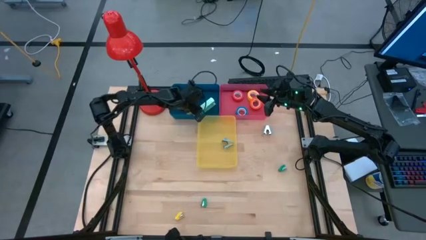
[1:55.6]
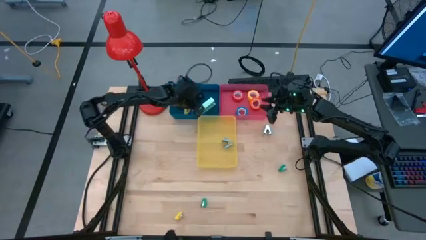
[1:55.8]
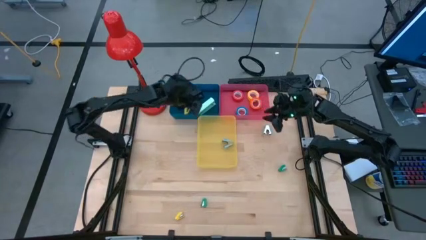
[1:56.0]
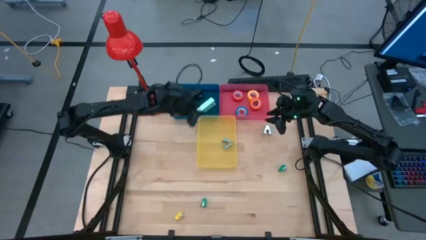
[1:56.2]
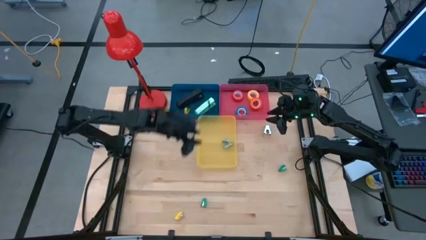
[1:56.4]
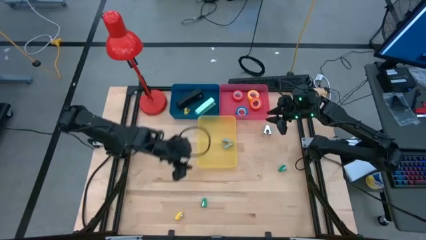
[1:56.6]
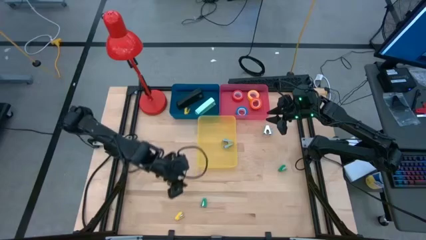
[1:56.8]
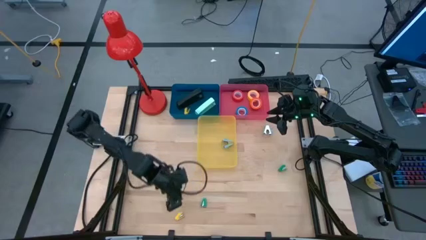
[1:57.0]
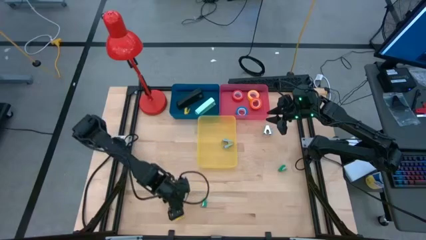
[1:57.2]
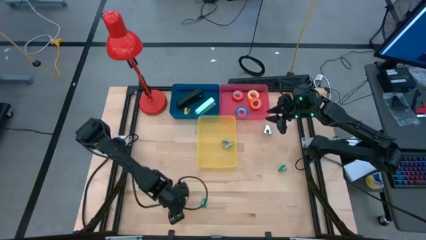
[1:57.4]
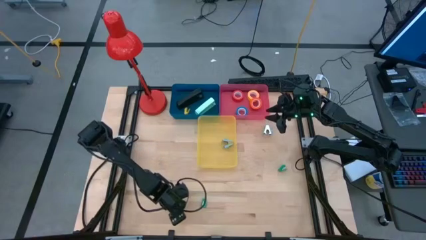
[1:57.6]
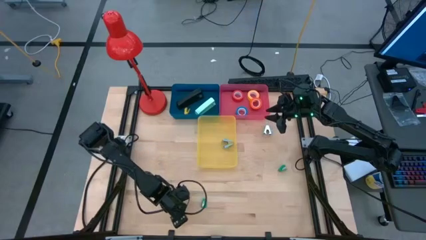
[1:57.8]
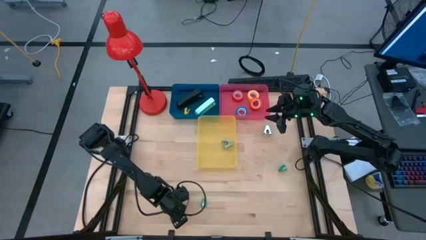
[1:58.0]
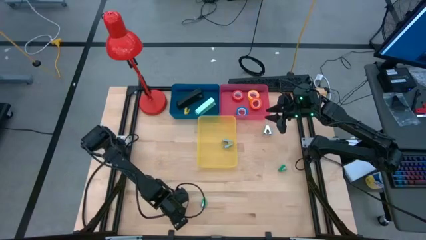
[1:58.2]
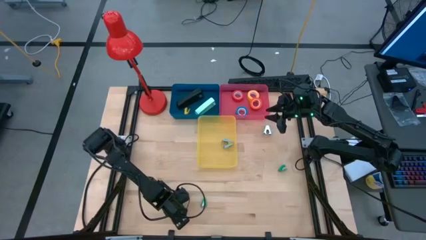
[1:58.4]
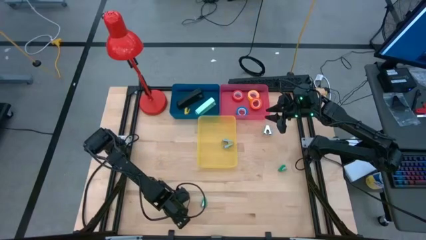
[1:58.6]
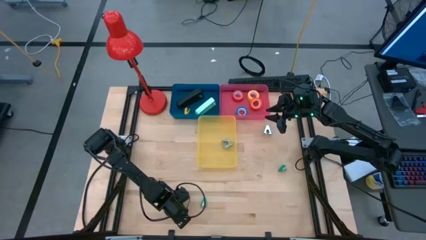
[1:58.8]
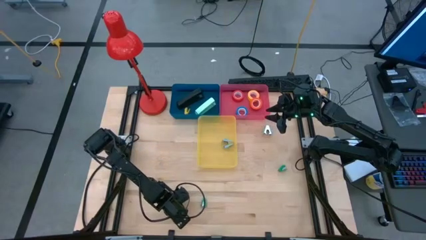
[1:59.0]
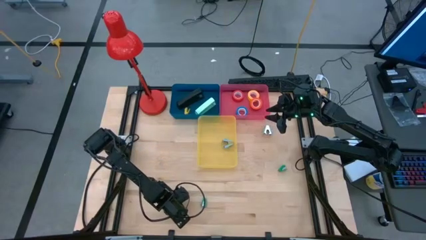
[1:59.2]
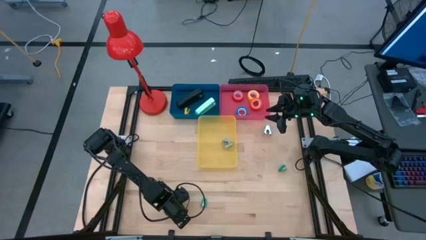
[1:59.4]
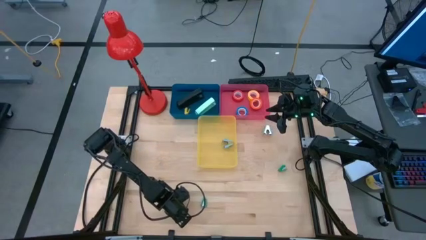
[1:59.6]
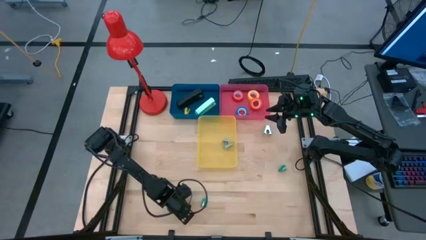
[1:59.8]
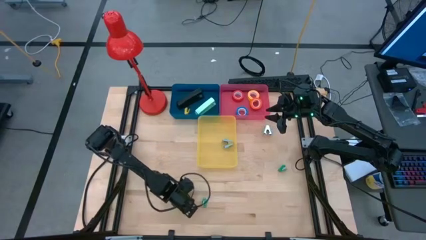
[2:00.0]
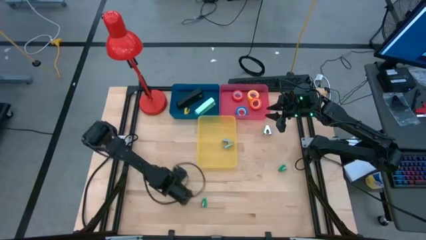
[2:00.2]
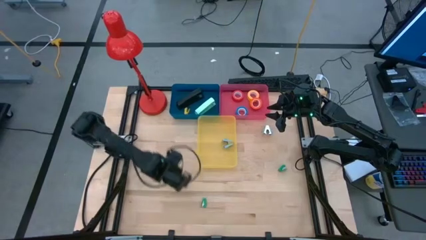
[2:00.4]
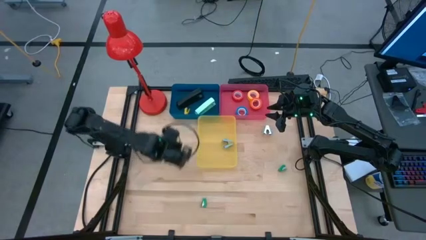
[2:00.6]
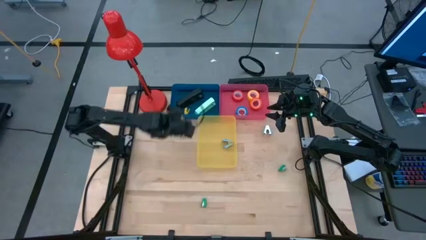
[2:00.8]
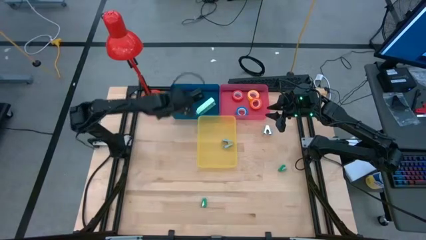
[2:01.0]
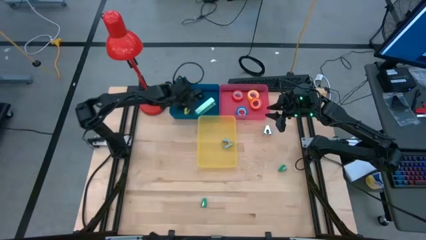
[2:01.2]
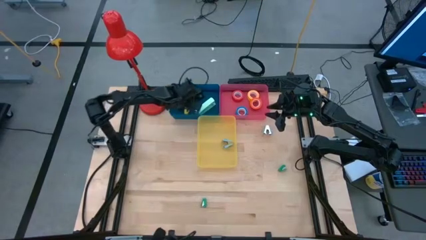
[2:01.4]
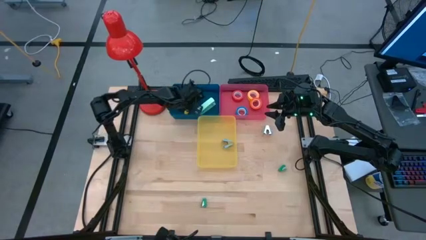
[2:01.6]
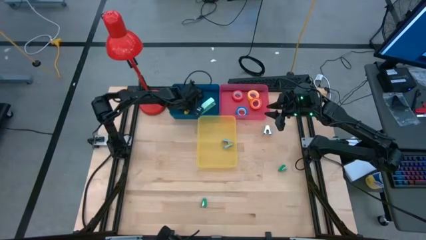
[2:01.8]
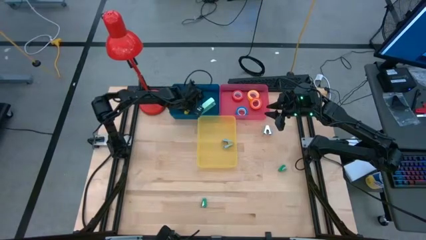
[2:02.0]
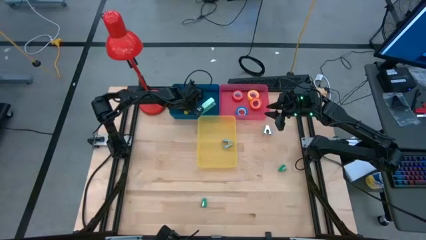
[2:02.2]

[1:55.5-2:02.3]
Task: Pick and place Stapler, Stapler remover, tape
Put the small yellow stapler into the blue bin

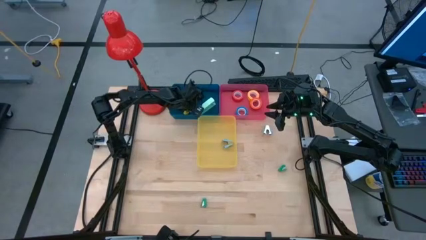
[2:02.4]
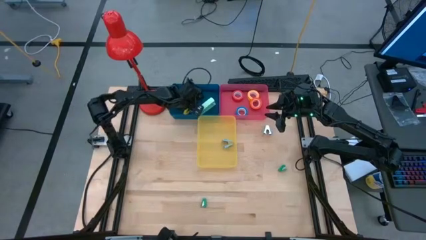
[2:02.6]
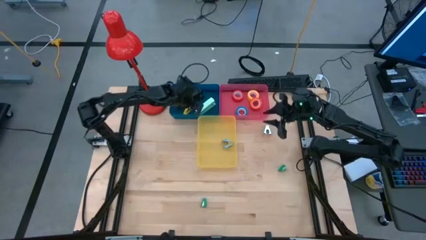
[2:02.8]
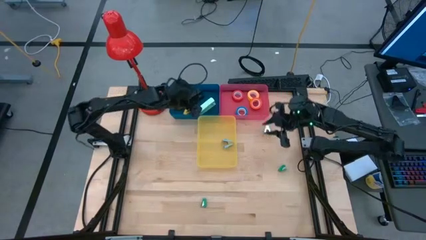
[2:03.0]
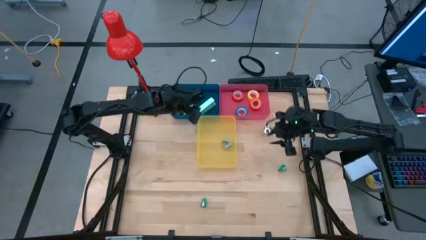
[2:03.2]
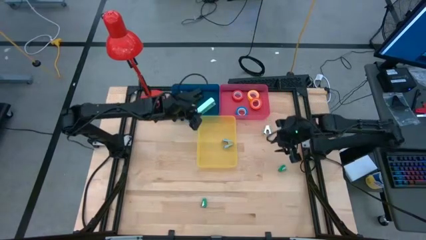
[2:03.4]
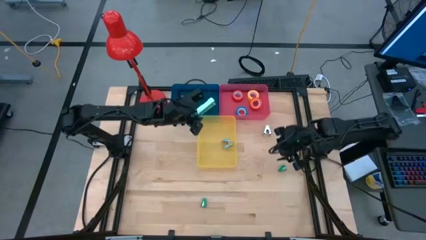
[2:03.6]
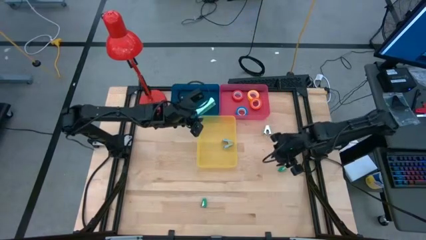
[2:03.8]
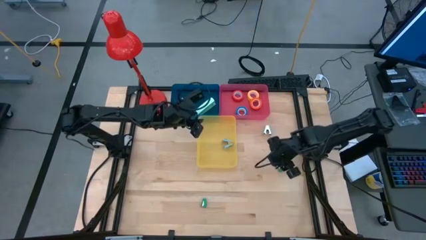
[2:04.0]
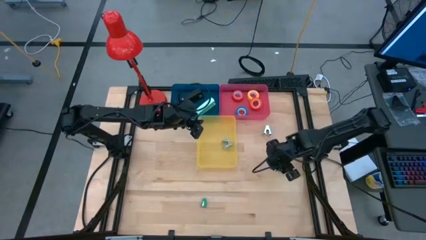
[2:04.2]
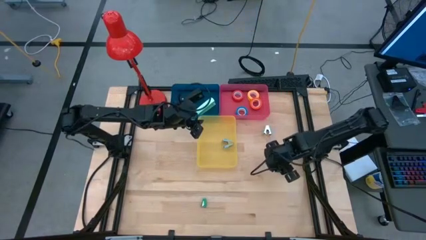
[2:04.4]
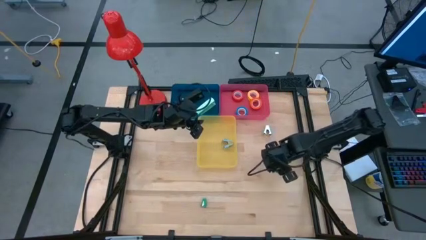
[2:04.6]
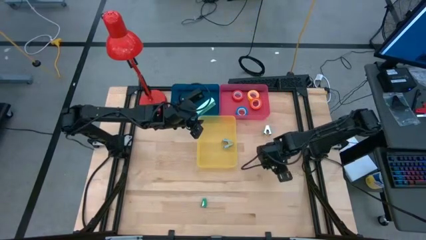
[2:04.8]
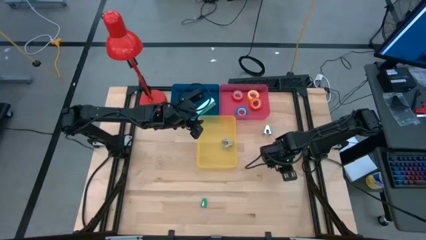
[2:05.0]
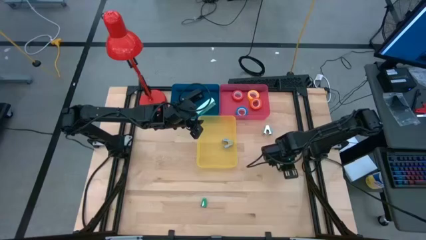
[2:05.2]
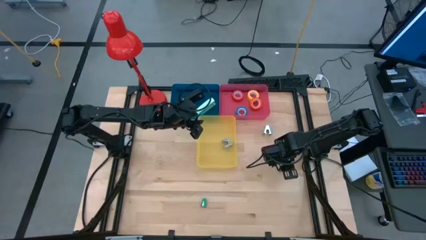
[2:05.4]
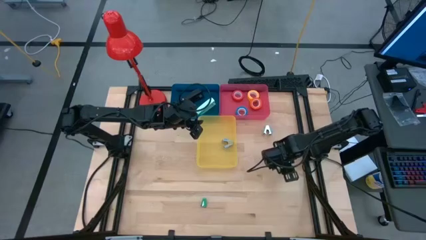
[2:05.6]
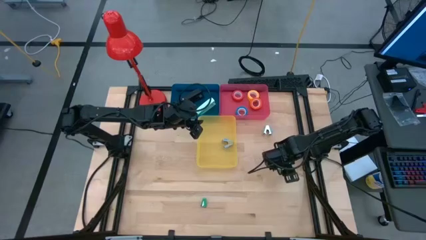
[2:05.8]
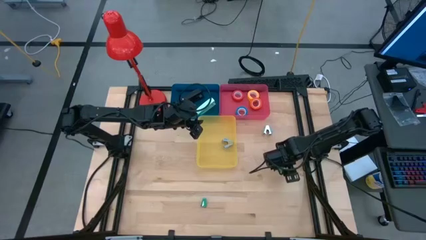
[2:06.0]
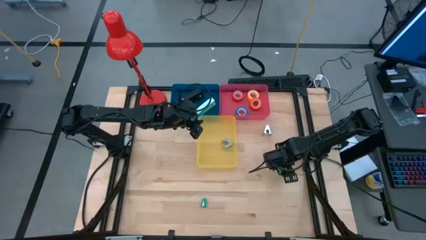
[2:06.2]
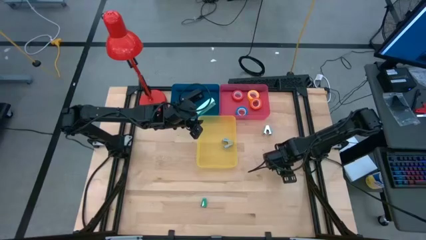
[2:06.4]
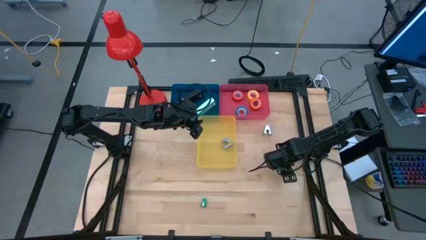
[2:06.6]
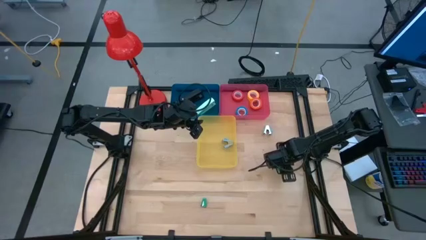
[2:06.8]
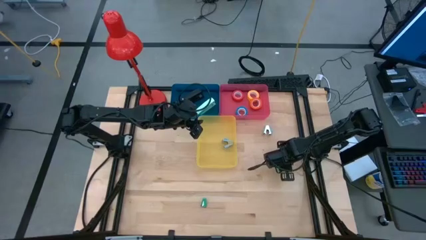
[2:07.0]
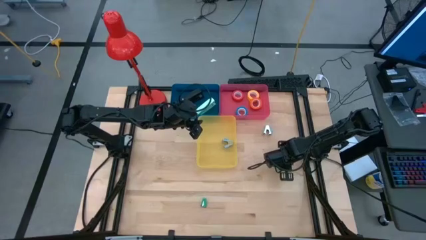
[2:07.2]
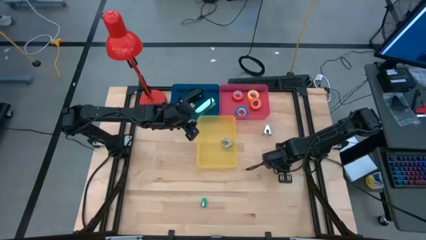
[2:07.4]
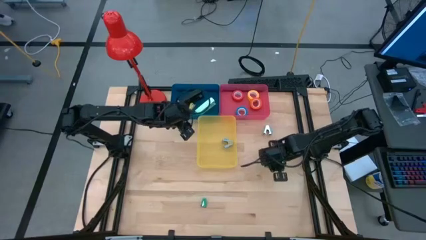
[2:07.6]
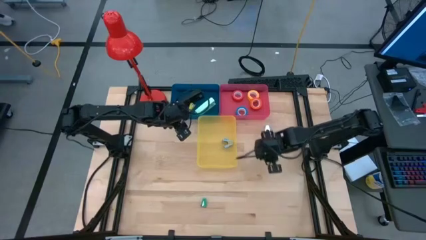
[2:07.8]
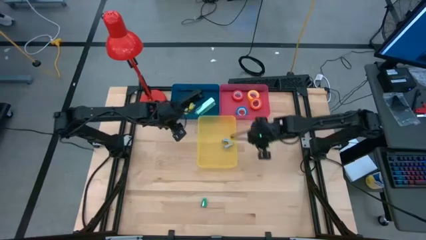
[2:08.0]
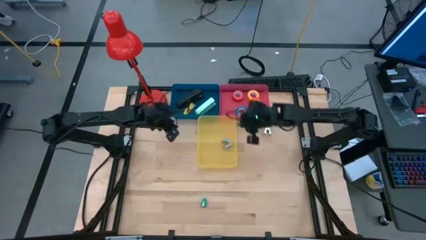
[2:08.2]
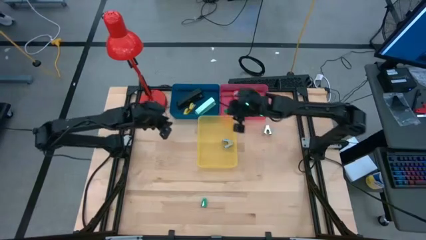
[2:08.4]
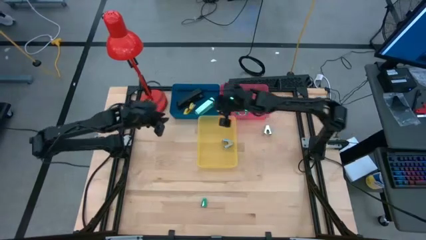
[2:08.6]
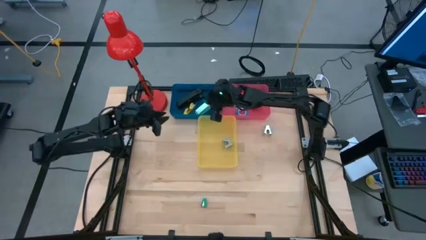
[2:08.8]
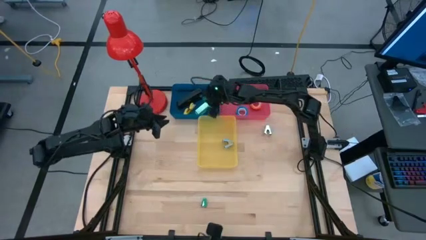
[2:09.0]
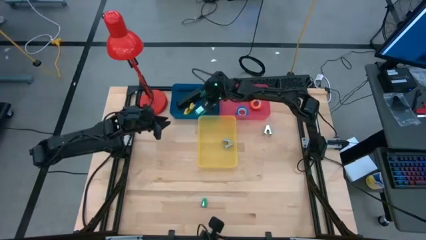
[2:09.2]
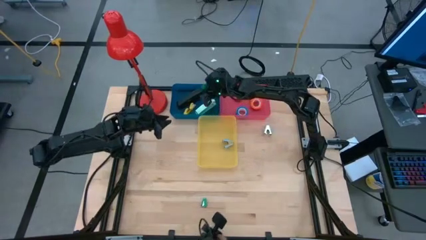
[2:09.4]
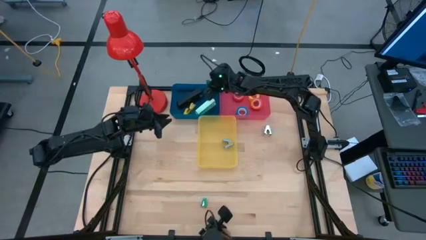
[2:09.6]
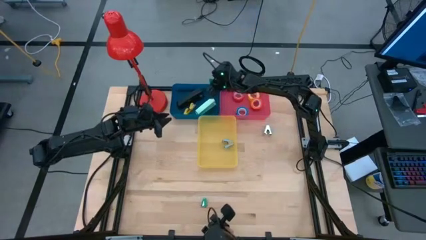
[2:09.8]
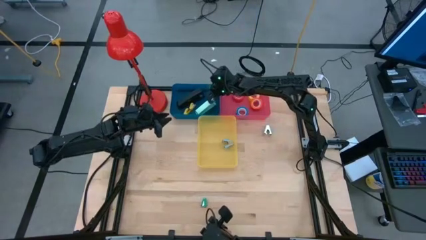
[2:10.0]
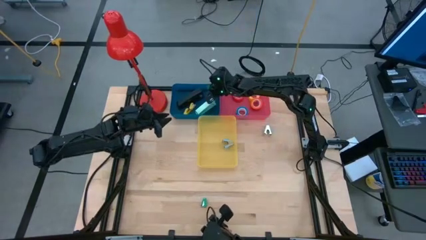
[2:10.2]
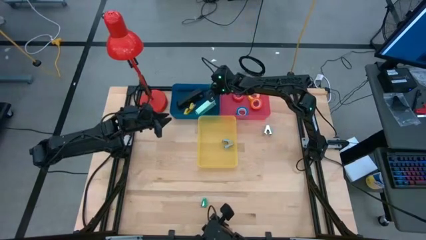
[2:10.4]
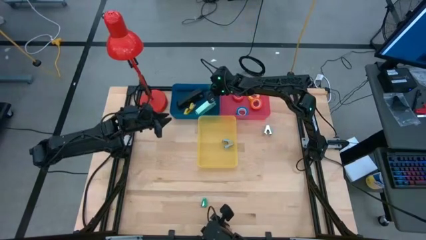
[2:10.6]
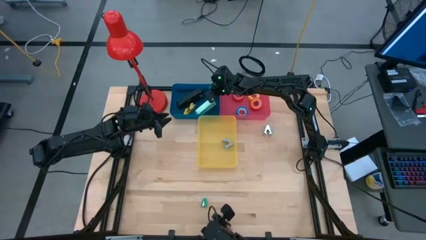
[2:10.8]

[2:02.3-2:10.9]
Put the top small green stapler into the blue bin

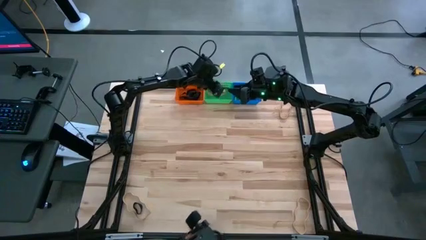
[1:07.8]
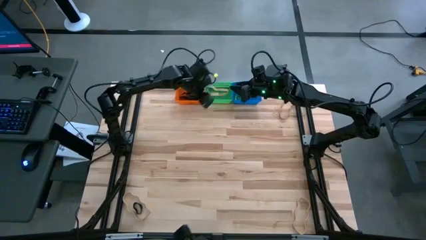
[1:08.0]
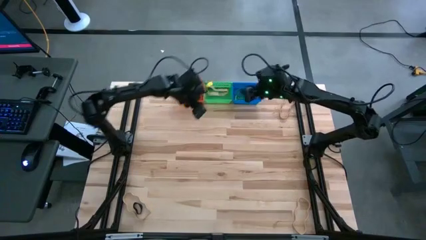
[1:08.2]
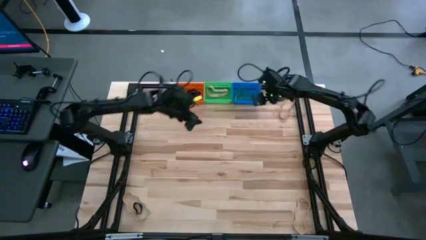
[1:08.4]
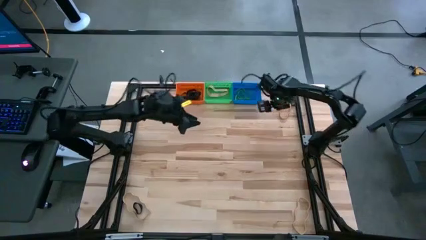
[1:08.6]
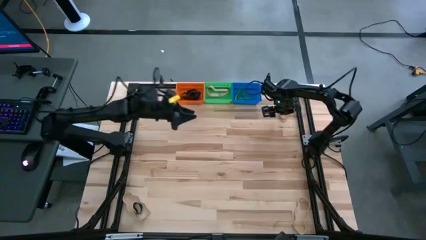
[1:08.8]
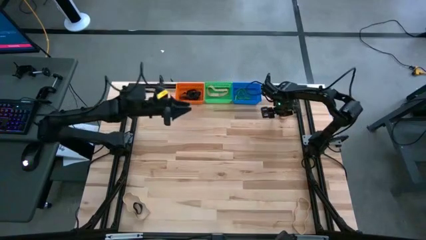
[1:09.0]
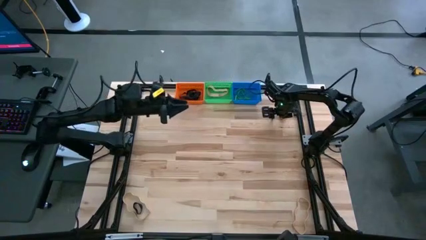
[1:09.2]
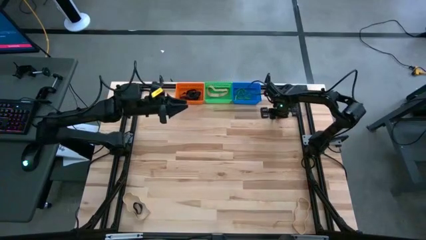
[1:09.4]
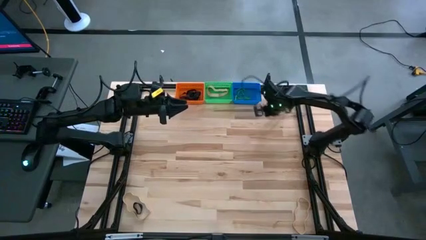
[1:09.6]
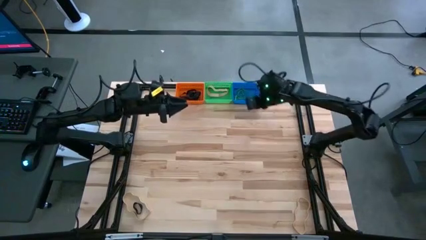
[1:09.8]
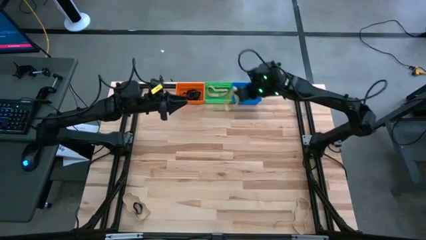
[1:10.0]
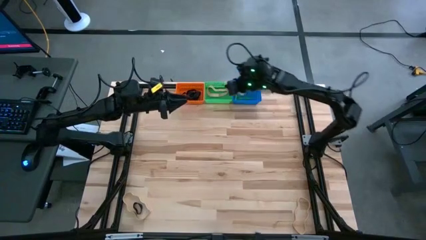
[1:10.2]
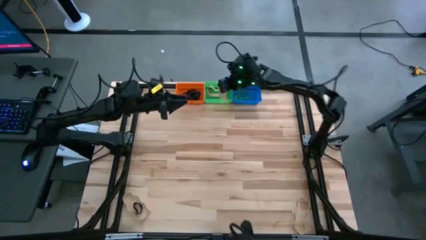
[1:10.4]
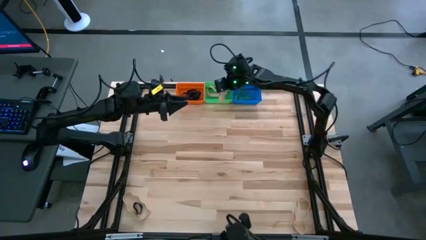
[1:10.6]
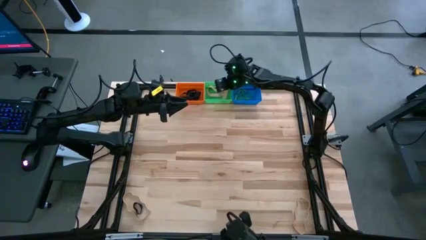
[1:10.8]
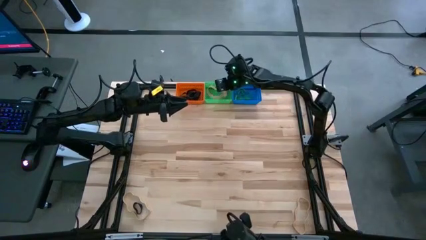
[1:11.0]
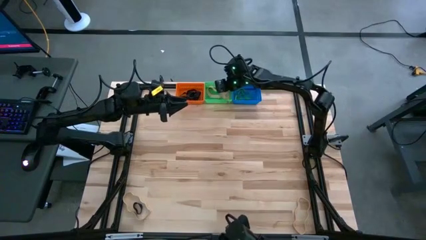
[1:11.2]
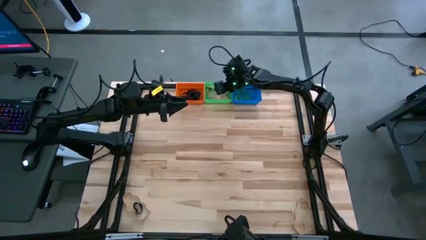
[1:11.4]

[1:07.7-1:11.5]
Task: Sort rubber bands into baskets
Put the white rubber band into the green basket
